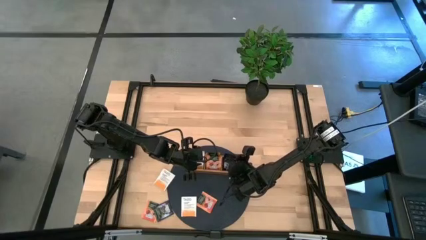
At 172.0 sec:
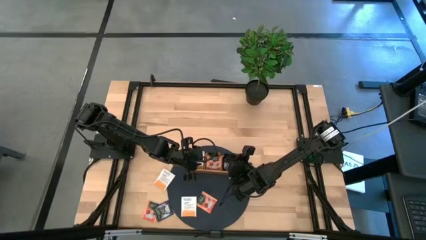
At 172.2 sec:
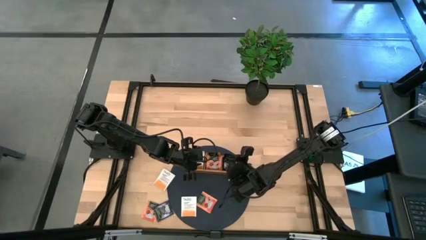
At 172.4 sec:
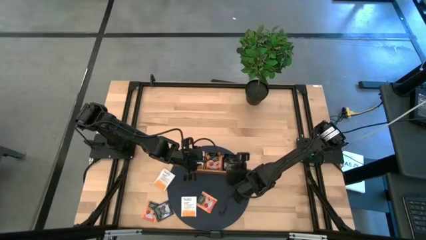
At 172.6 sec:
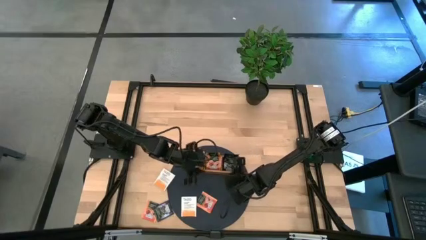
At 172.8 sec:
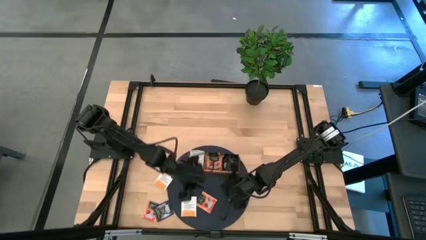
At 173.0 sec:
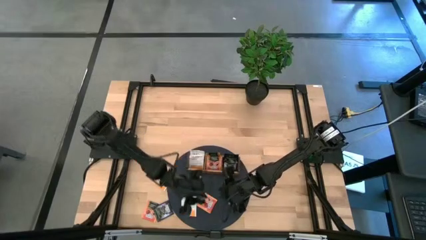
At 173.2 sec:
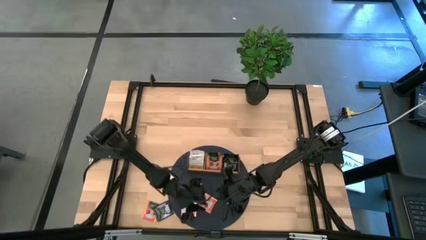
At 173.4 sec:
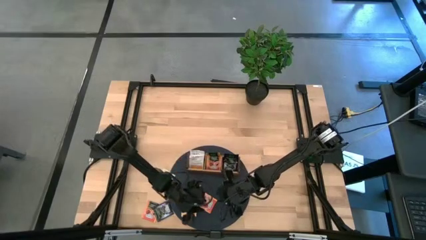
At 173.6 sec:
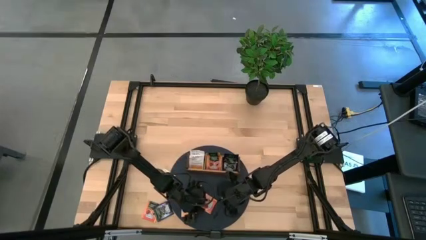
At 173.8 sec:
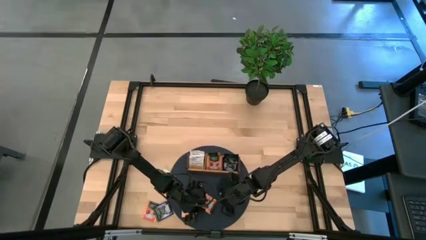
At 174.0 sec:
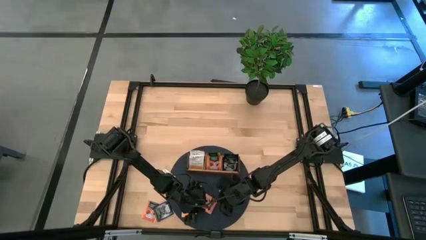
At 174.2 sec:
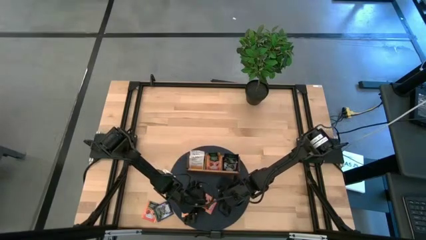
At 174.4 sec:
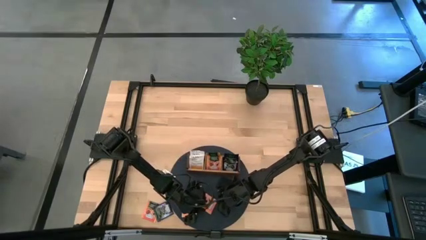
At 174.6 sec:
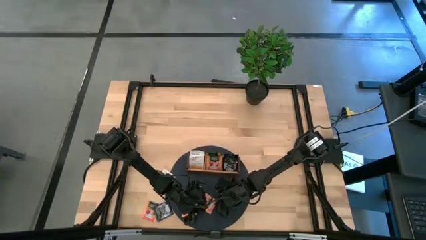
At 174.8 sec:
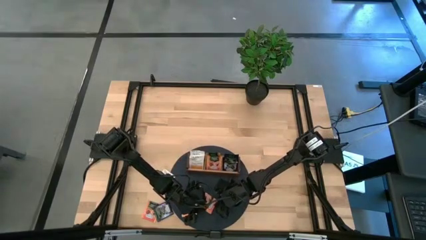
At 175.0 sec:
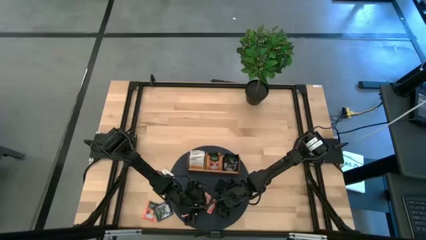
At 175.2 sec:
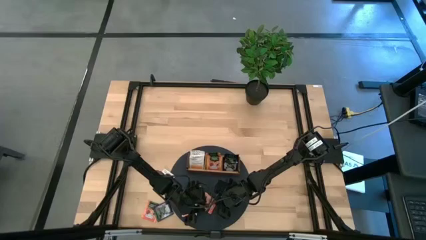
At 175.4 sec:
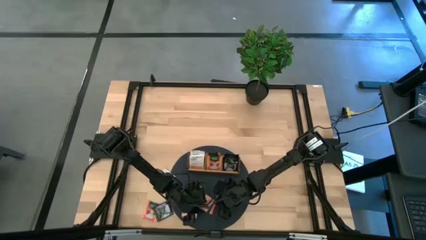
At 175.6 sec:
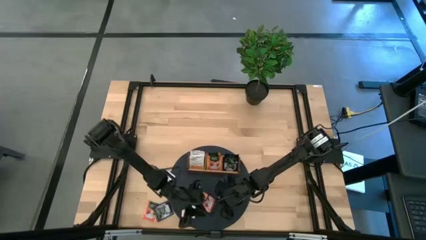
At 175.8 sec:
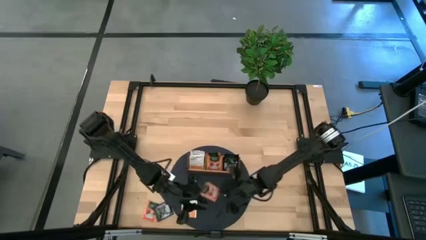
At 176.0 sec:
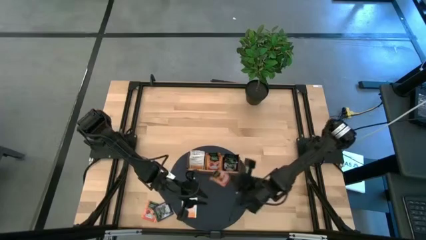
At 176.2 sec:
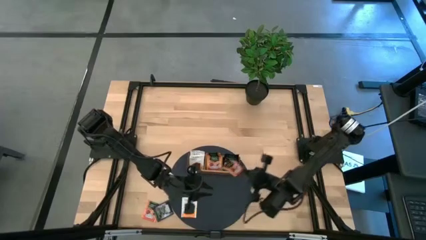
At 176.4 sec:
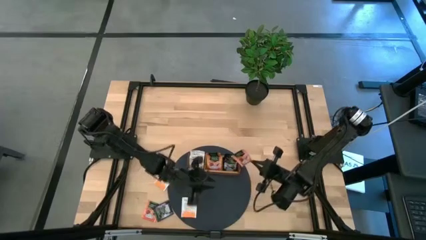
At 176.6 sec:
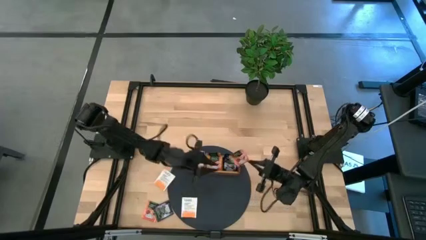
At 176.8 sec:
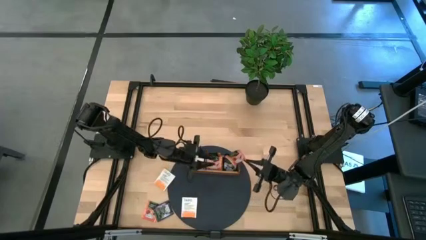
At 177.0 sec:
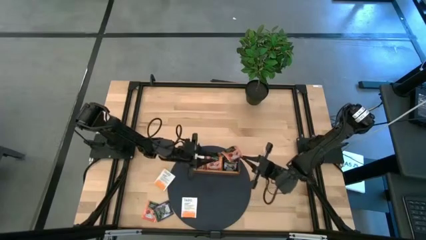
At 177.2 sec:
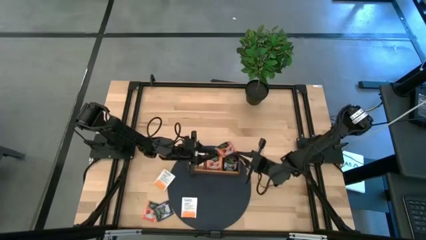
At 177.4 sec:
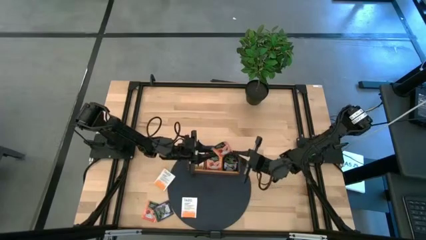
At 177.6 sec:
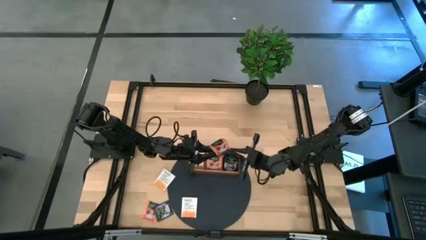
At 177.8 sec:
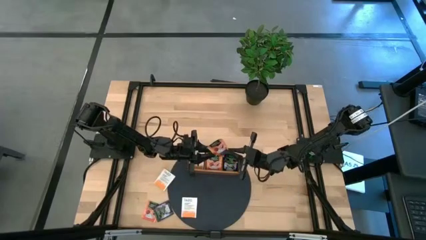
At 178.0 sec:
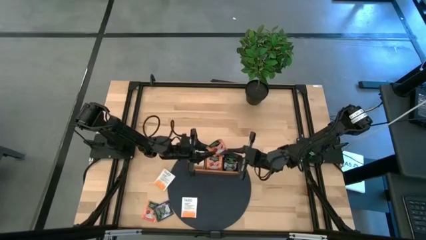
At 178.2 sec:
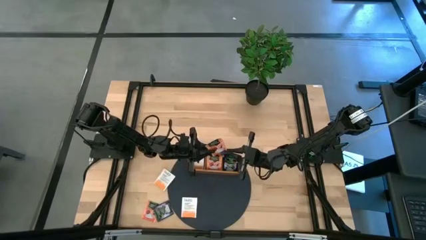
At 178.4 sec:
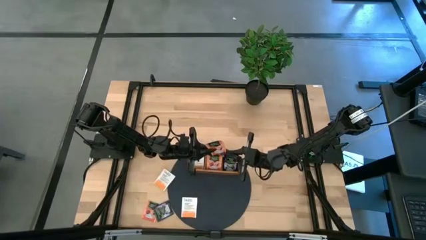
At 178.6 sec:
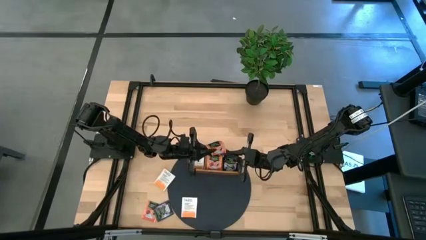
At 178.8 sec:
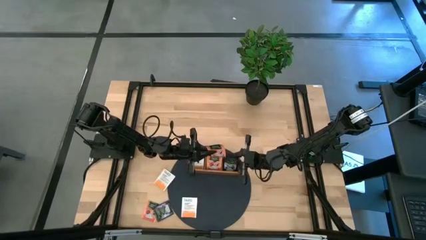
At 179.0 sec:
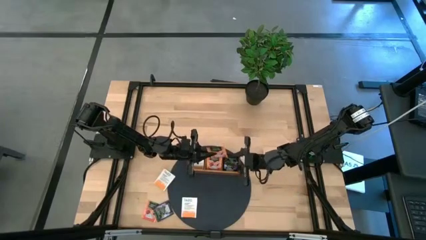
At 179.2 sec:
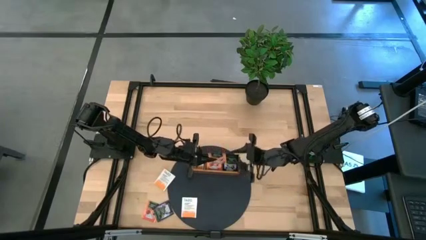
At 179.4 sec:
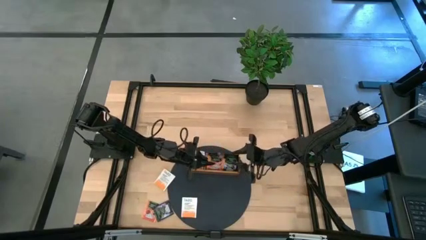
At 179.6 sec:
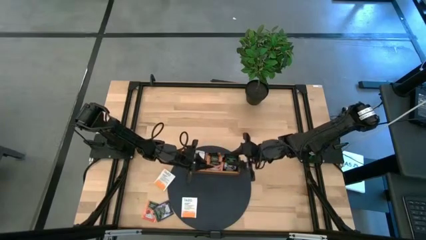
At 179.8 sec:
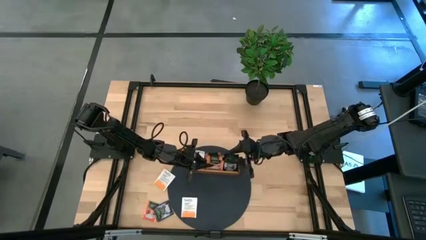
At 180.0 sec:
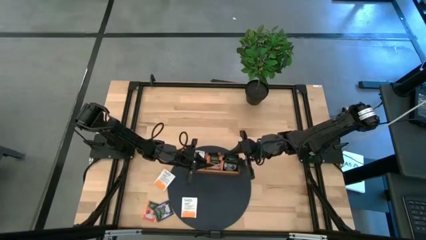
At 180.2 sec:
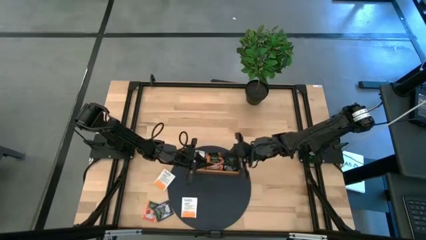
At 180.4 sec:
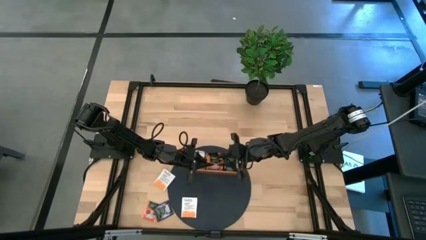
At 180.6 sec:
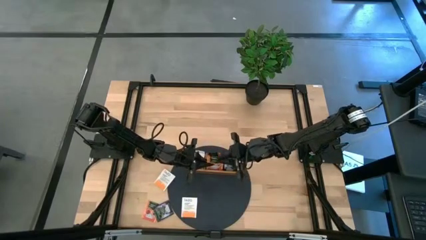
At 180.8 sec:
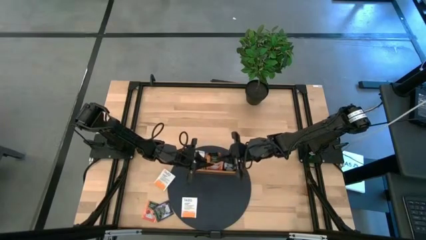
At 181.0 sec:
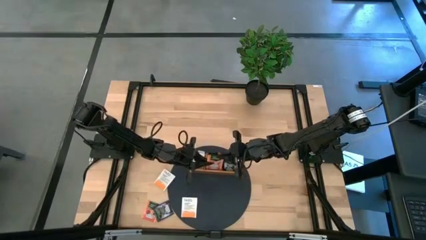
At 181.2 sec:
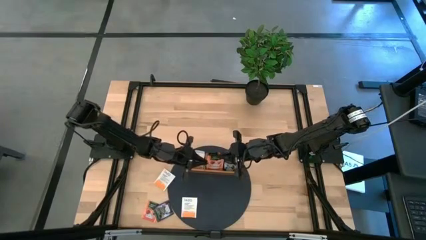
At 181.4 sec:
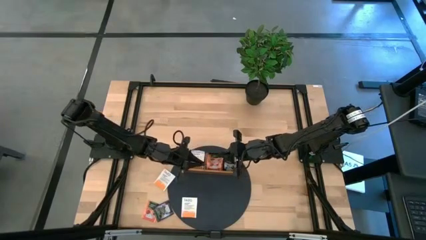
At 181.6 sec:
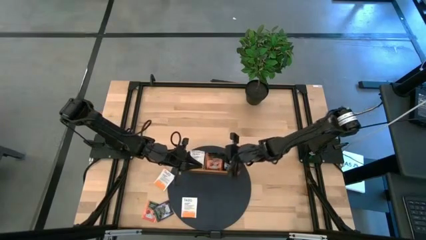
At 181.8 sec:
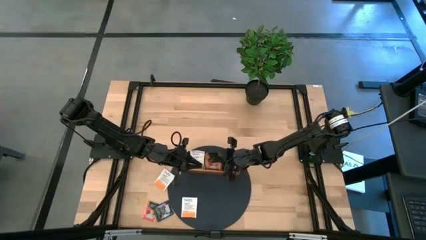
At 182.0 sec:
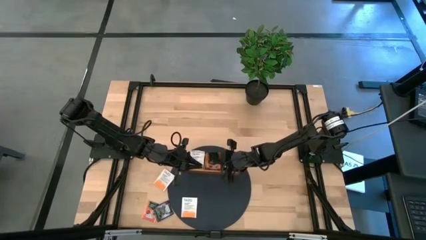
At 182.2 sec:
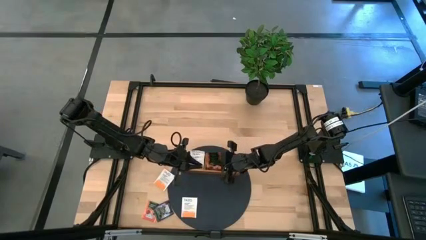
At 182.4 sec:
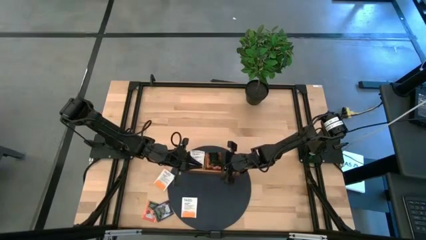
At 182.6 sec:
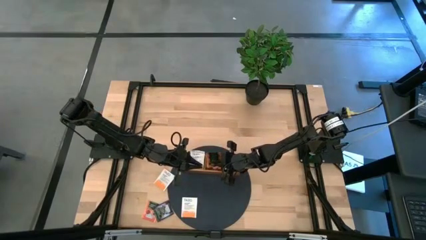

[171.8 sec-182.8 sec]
Task: Pick & Place Tea
Put the orange black tea bag into the middle section of the wooden organizer

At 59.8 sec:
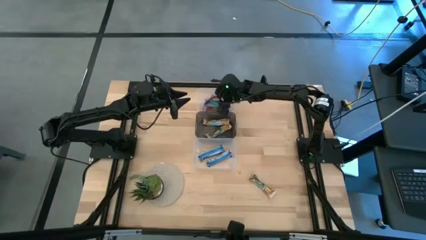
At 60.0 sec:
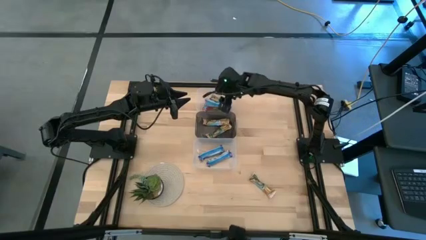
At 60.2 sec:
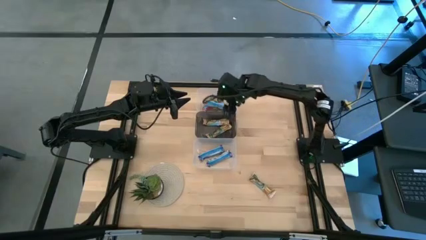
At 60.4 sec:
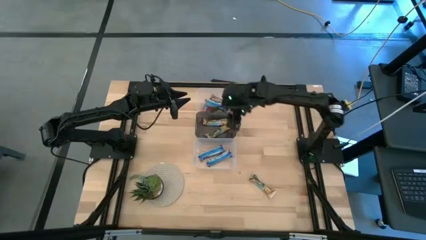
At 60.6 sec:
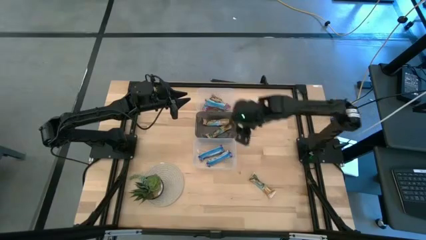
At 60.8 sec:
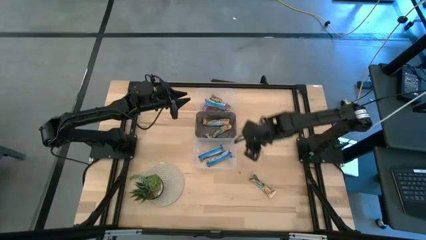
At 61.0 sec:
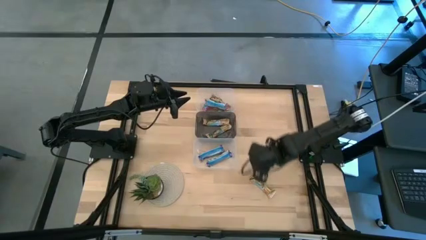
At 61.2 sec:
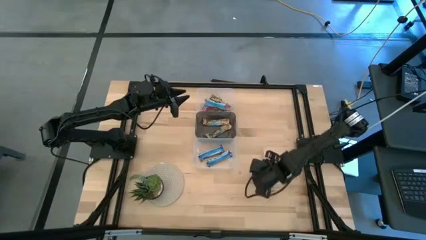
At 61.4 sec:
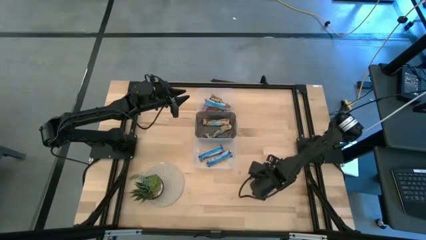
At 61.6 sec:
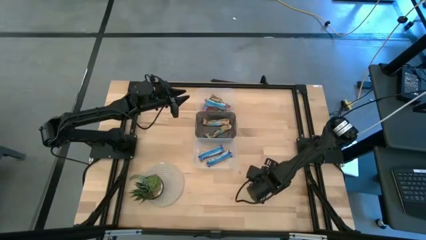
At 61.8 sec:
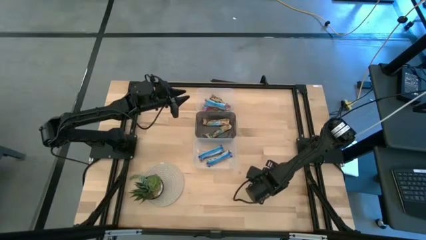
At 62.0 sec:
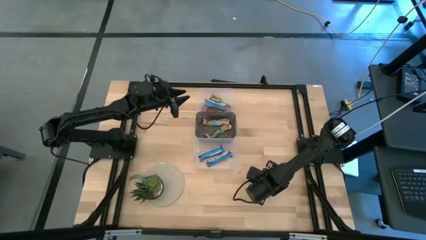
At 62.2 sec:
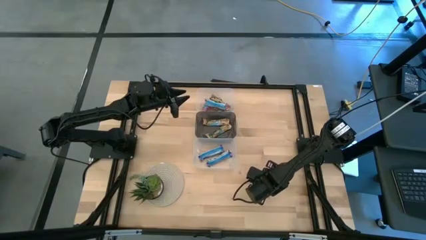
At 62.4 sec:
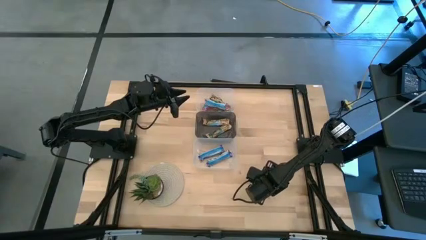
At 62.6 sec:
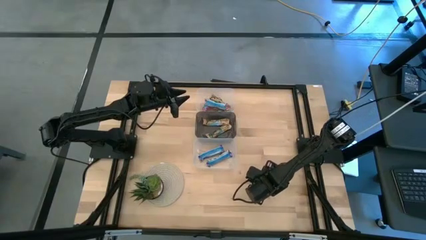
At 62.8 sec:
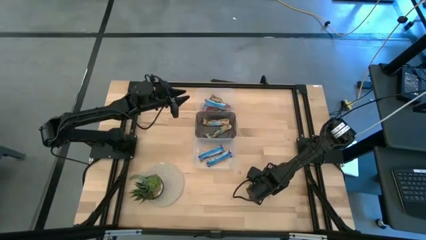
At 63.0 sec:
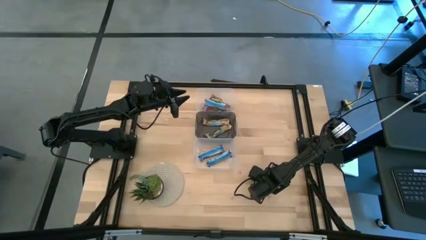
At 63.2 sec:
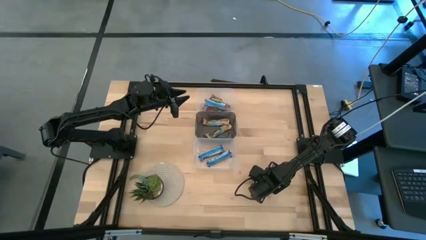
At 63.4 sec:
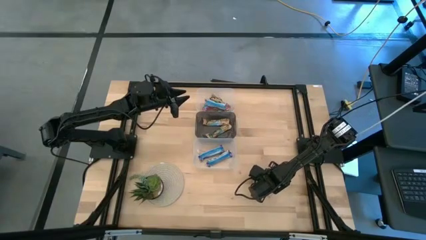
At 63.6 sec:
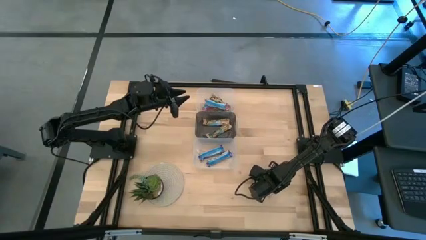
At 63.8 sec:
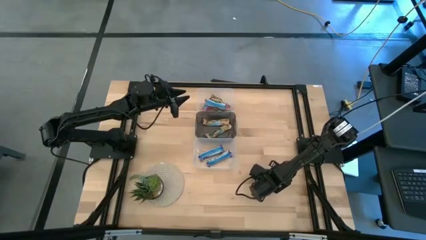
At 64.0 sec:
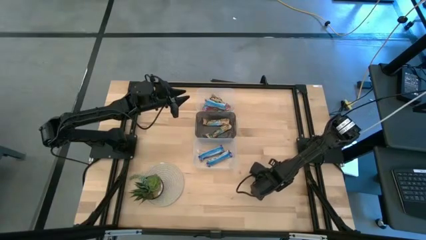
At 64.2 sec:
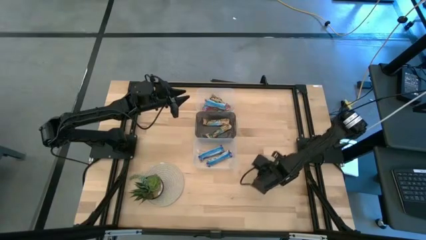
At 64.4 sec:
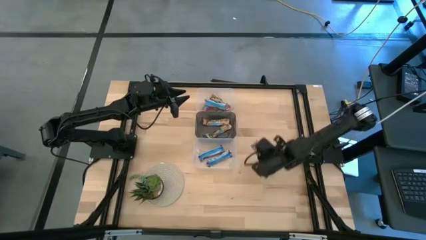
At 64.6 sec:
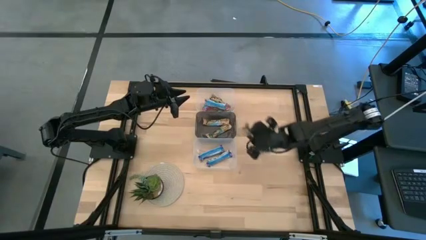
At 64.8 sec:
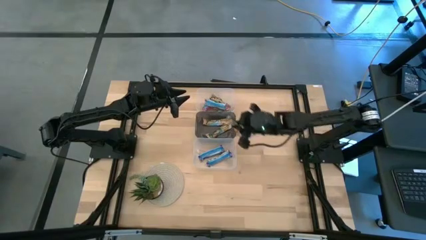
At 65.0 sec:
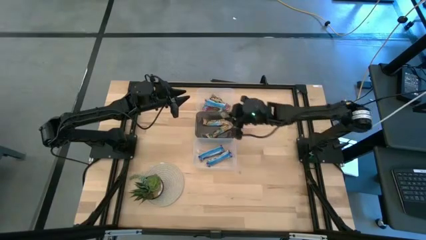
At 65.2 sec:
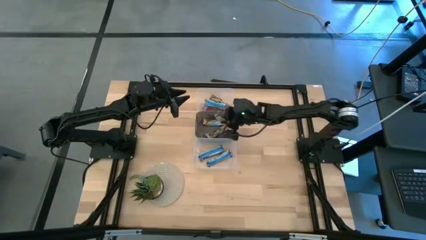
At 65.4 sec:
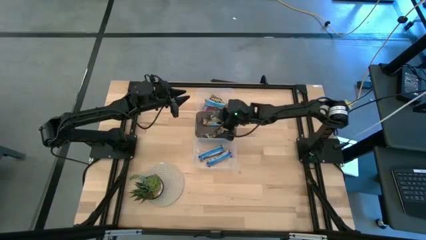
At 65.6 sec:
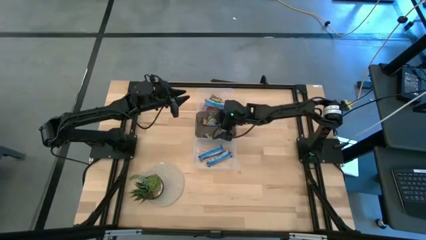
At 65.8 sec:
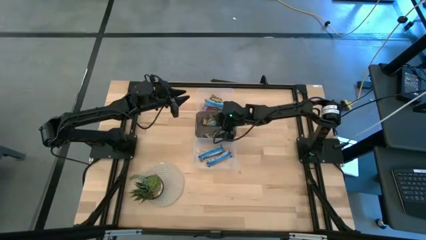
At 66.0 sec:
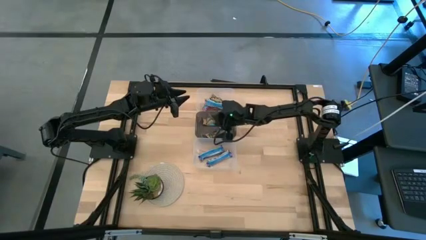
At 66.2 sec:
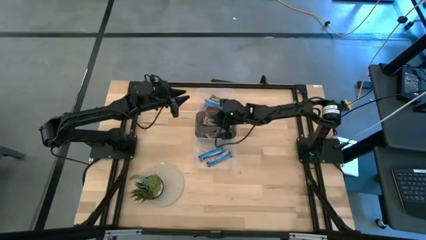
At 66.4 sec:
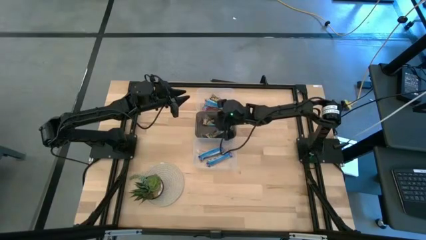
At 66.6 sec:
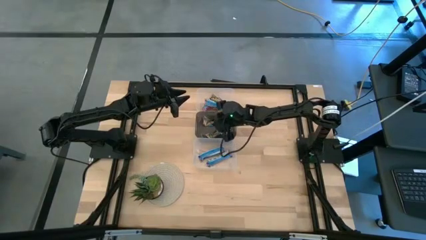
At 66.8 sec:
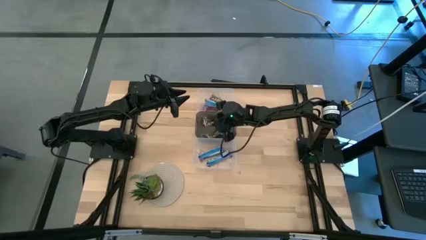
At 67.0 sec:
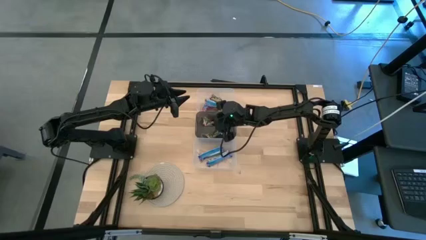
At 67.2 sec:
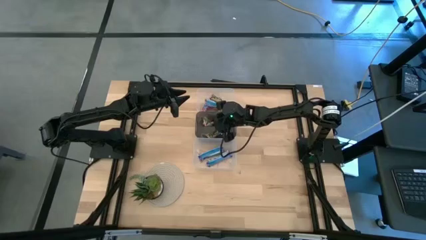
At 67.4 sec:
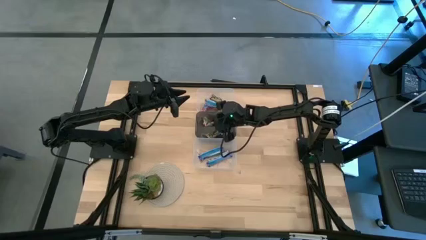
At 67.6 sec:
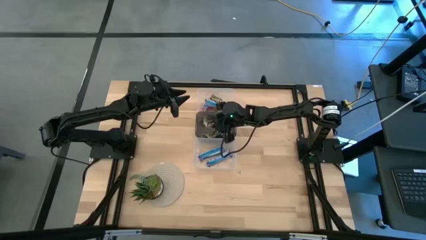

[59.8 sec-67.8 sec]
Task: Pick and place Granola Bars by type
Put the yellow granola bar into the black bin
